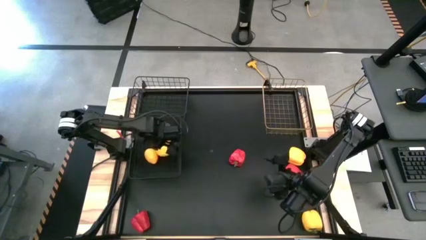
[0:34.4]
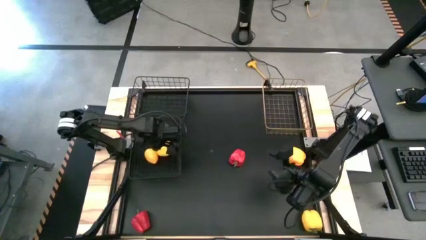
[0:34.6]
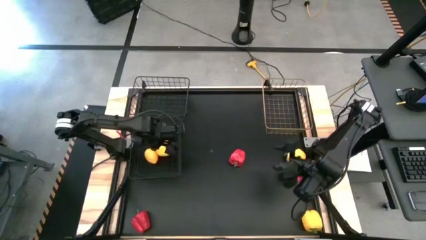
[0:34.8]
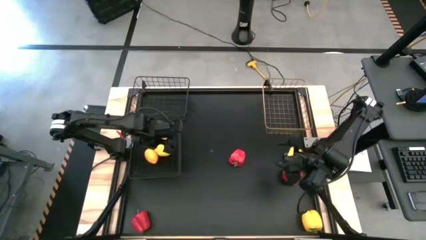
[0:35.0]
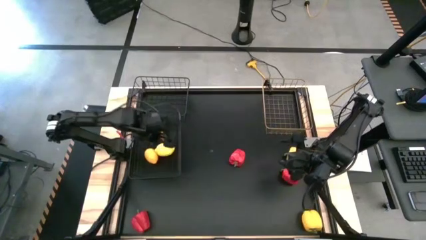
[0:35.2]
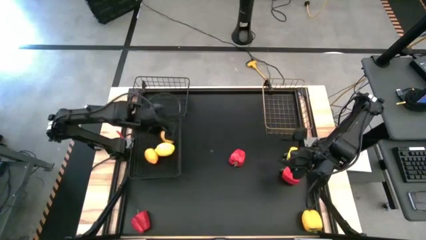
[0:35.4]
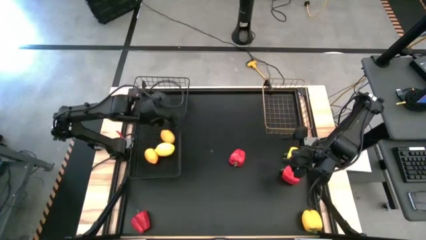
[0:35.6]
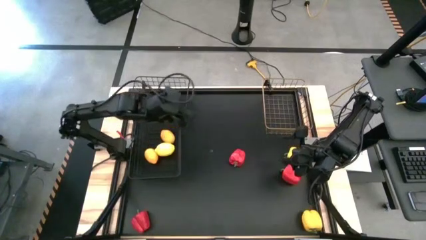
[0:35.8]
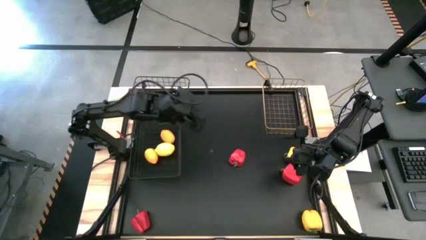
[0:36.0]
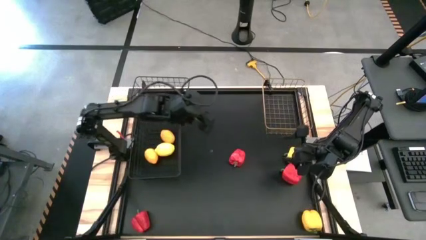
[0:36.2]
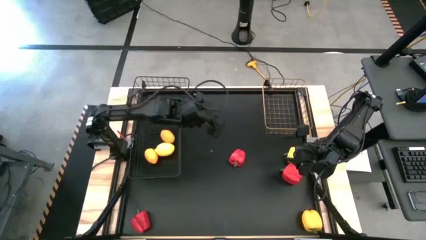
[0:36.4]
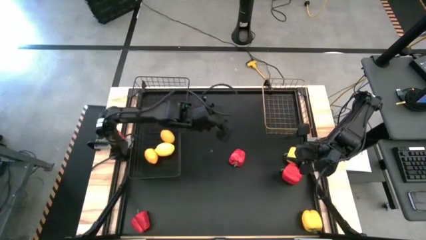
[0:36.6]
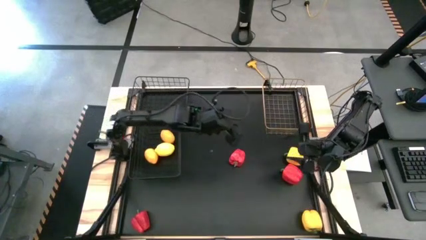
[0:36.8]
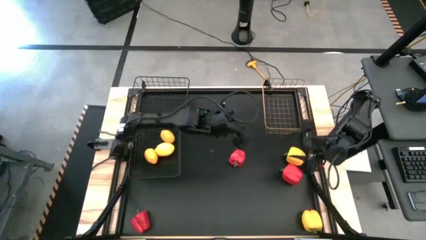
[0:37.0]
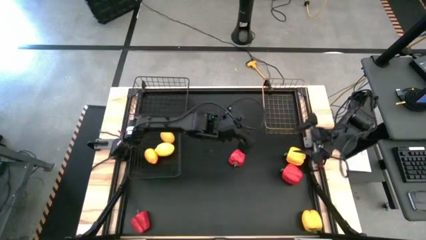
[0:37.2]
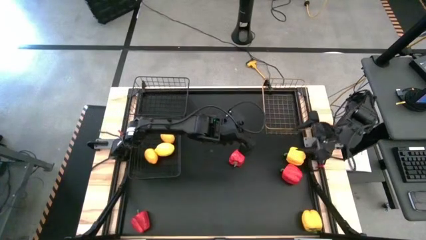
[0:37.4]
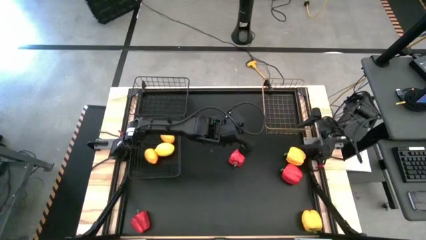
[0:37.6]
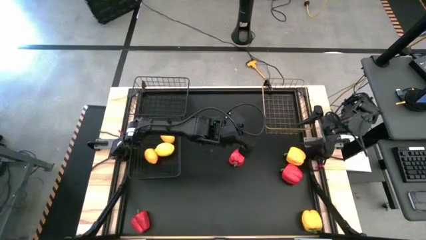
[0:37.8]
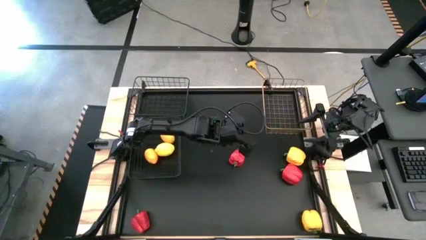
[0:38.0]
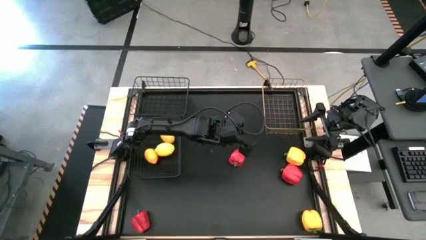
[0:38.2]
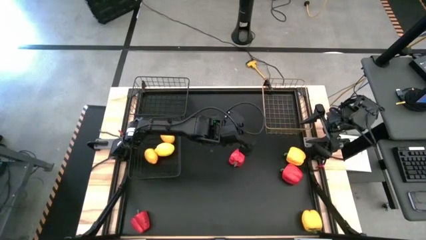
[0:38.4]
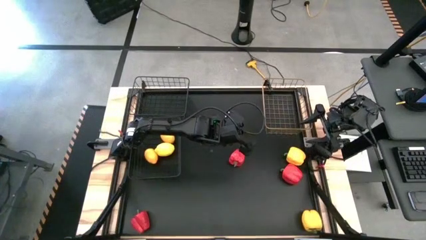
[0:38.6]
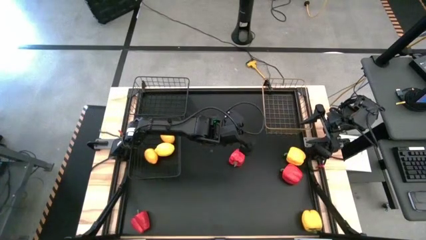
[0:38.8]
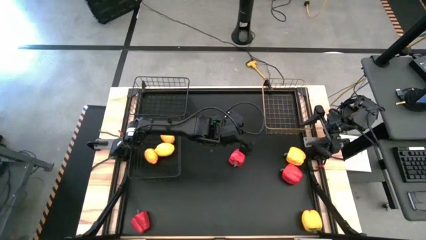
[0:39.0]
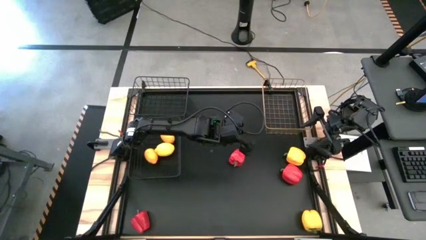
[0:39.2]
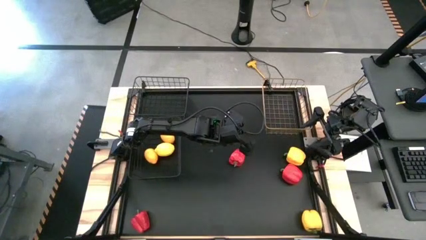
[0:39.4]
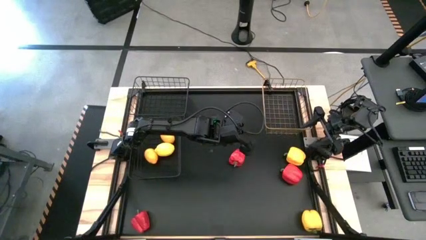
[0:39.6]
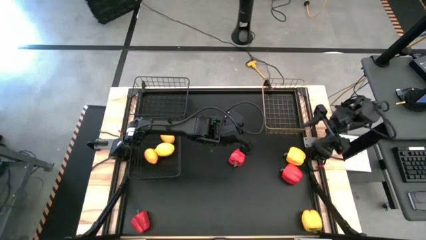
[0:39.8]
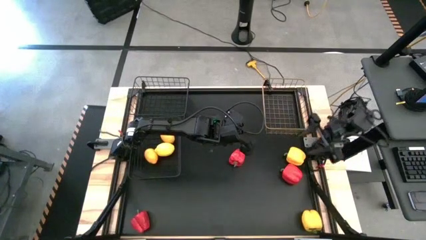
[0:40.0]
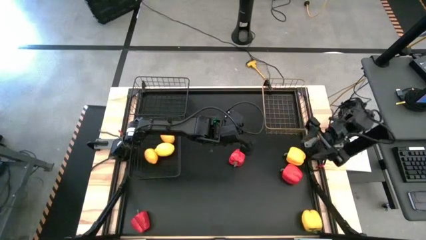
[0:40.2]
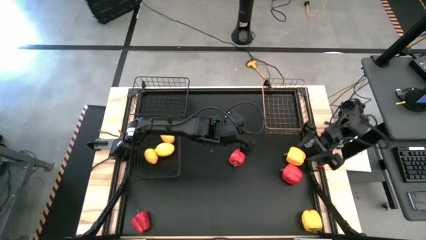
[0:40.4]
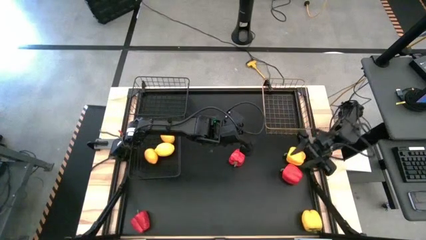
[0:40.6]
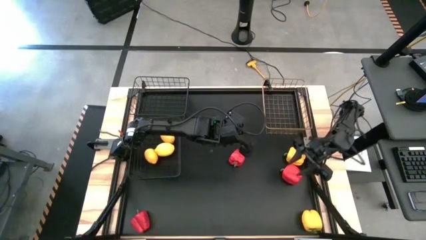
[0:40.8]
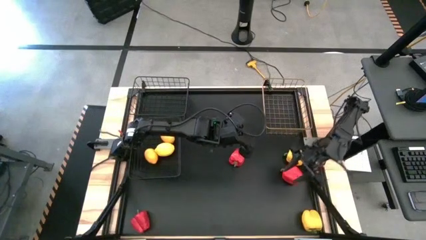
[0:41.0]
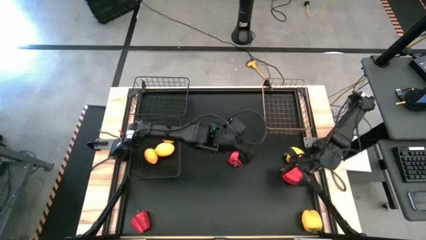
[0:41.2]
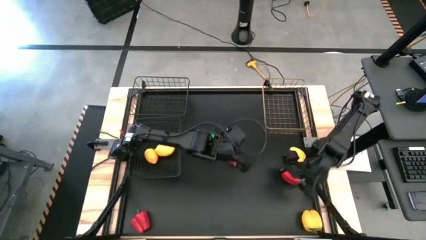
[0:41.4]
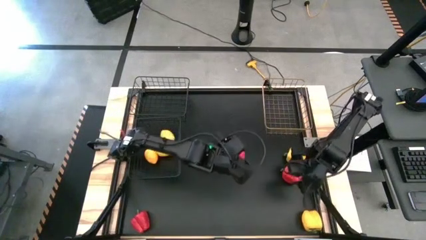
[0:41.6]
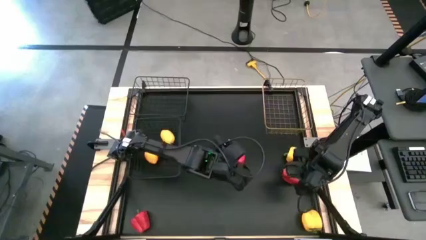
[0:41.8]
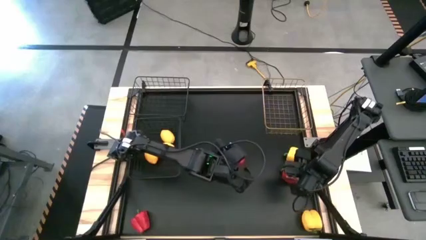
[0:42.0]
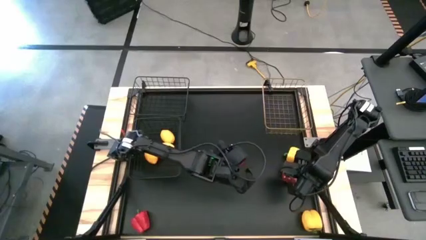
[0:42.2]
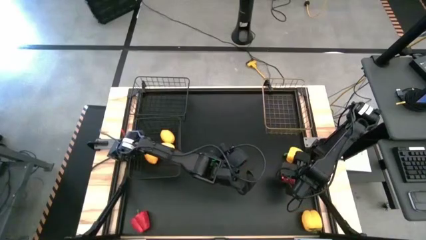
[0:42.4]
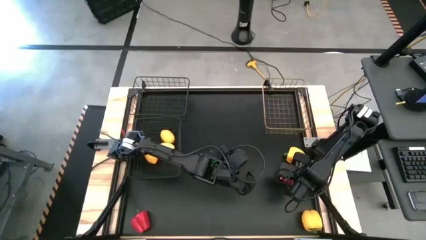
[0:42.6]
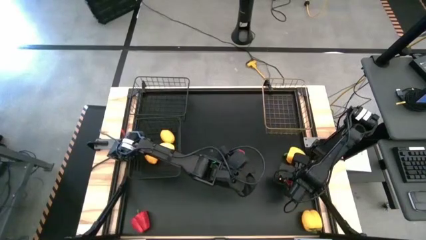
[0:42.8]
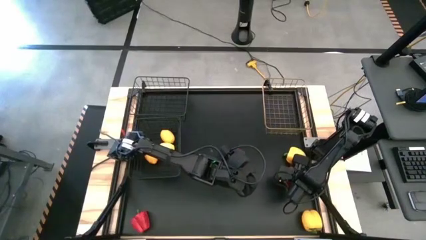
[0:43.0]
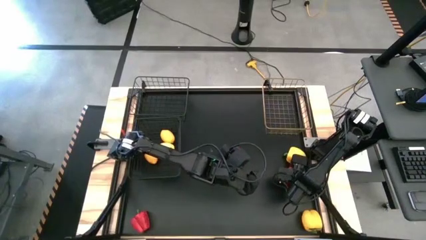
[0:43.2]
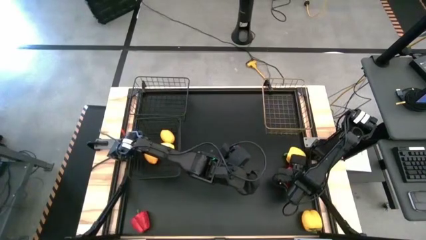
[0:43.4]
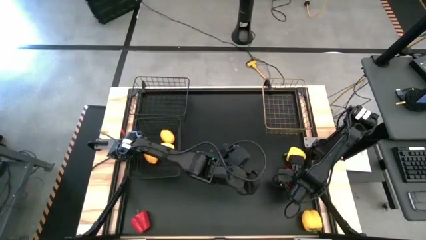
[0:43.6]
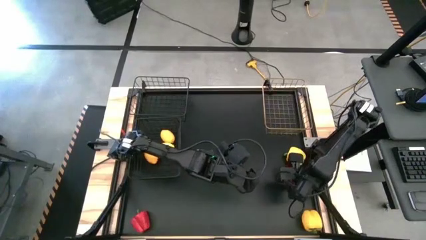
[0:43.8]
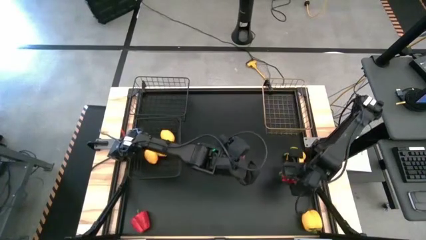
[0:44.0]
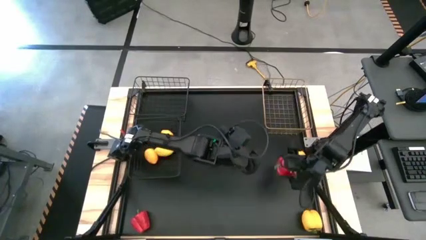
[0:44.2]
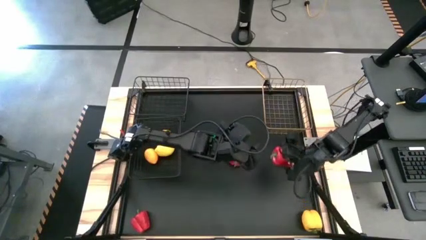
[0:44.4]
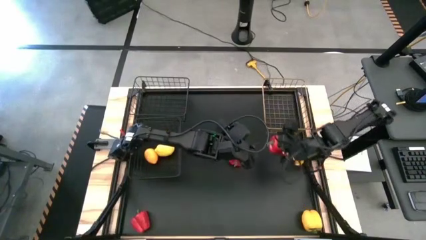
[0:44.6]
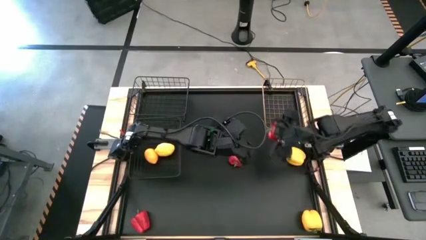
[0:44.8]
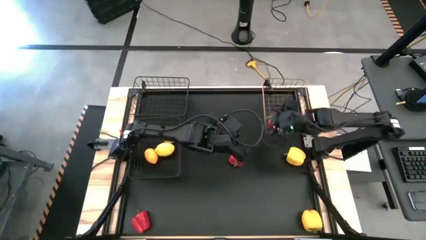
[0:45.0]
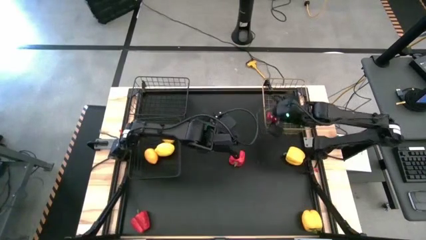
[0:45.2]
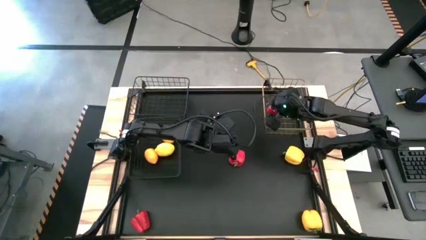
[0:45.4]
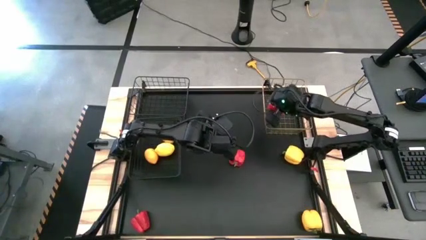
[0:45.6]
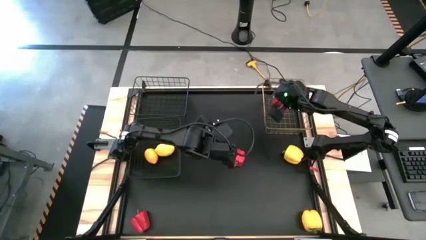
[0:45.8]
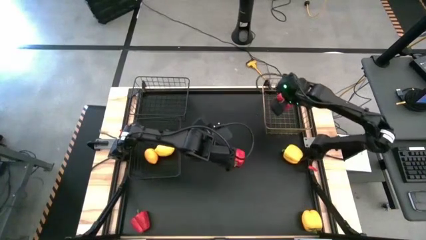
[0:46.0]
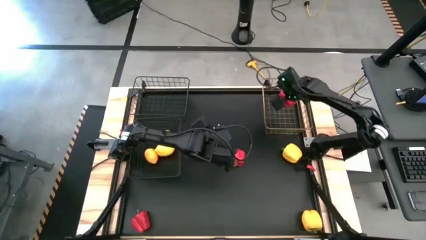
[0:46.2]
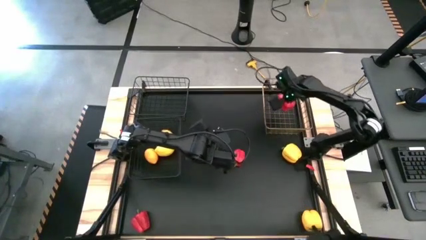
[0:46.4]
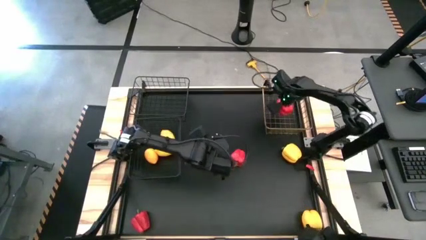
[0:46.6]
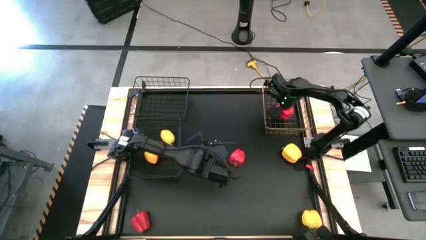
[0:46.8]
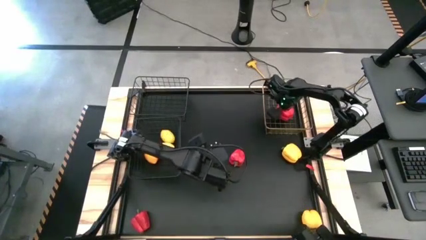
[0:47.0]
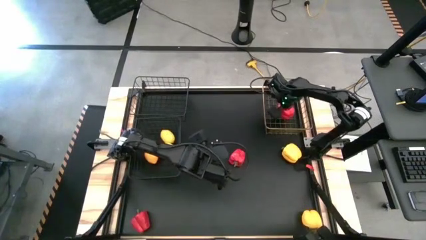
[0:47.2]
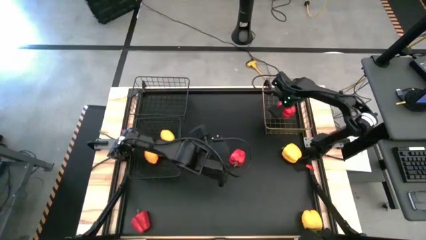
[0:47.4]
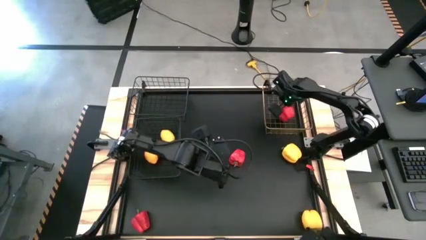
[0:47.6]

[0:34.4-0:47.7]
Task: Sort produce into baskets
Put the top right red bell pepper into the gold wire basket

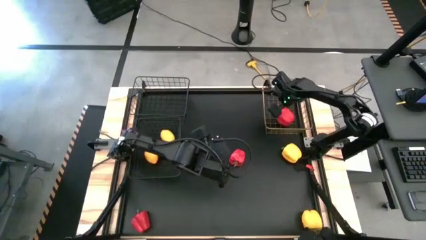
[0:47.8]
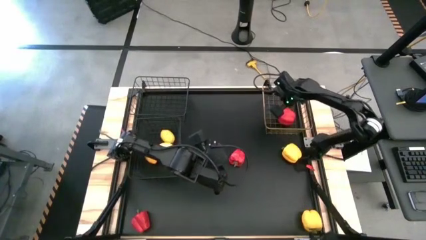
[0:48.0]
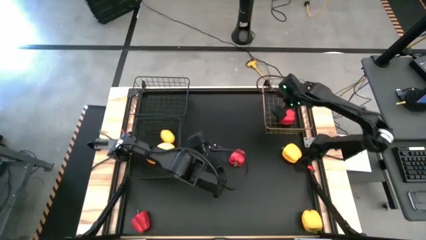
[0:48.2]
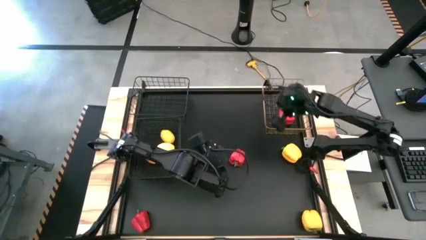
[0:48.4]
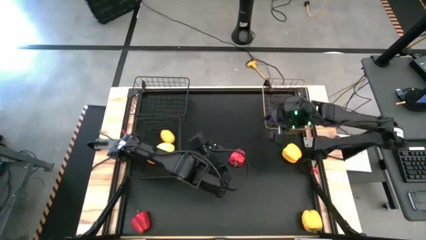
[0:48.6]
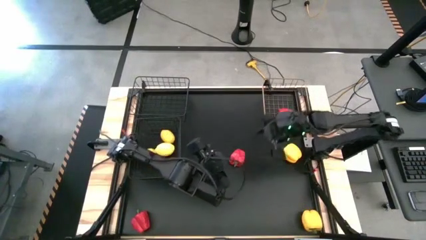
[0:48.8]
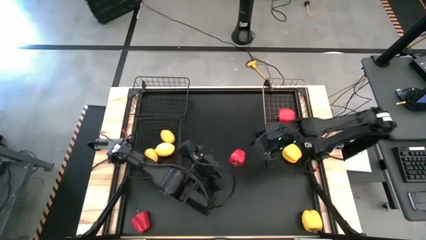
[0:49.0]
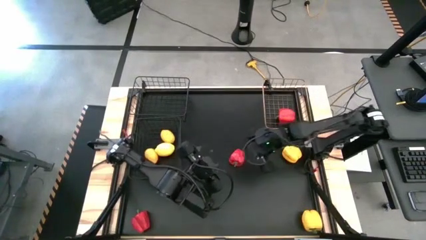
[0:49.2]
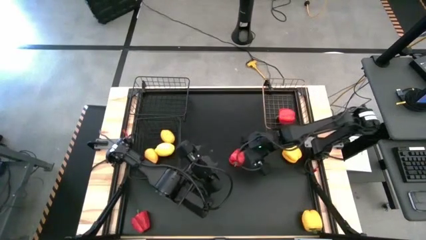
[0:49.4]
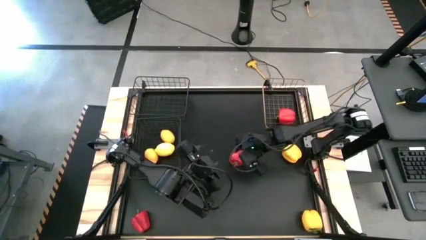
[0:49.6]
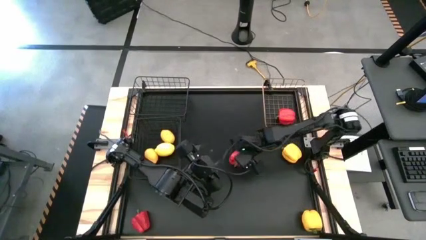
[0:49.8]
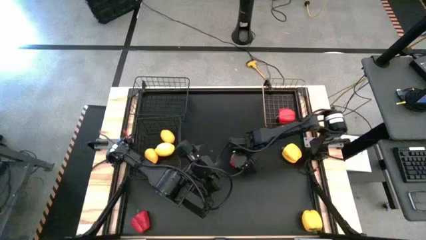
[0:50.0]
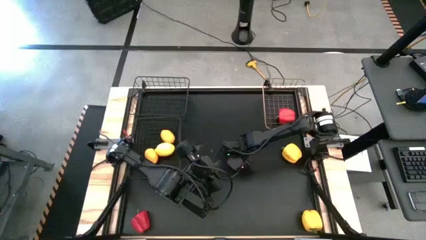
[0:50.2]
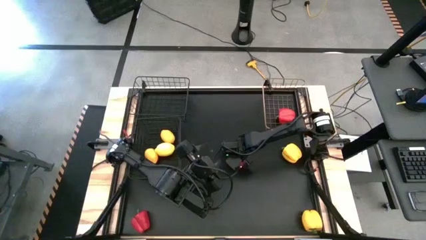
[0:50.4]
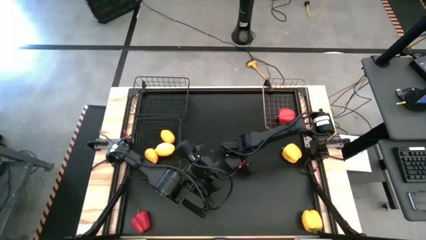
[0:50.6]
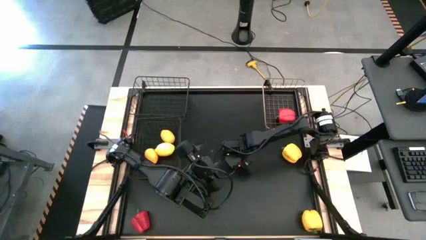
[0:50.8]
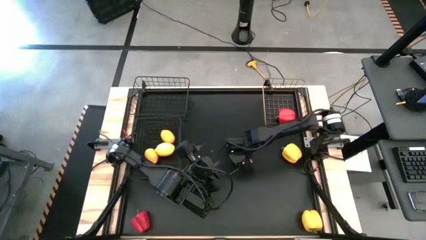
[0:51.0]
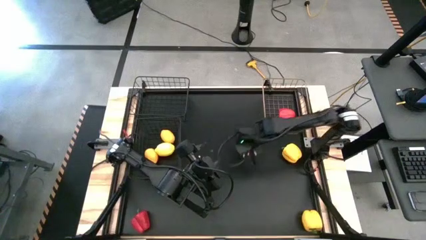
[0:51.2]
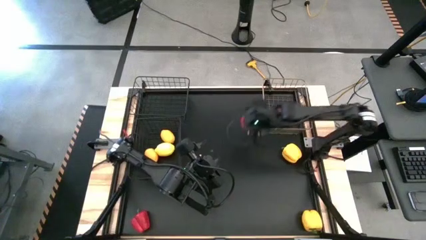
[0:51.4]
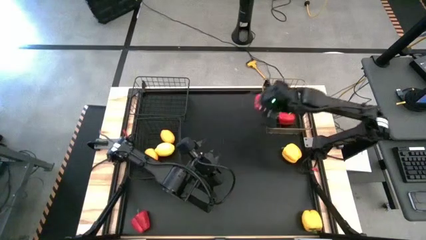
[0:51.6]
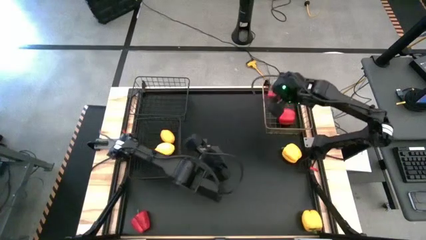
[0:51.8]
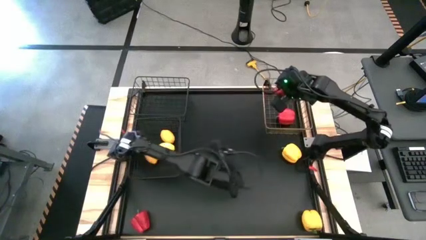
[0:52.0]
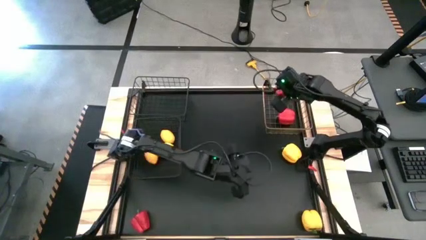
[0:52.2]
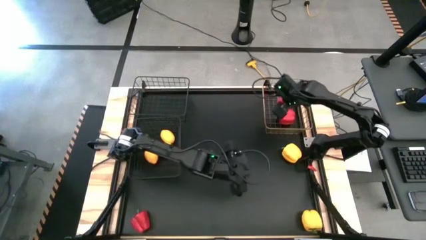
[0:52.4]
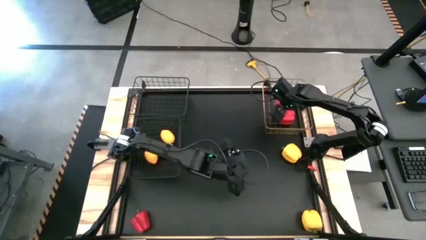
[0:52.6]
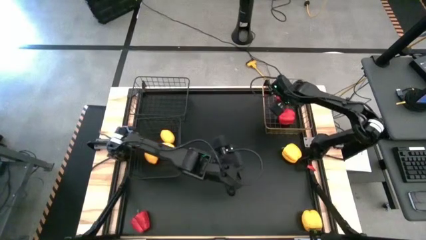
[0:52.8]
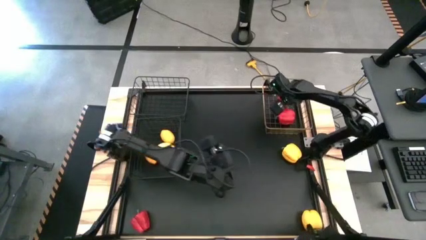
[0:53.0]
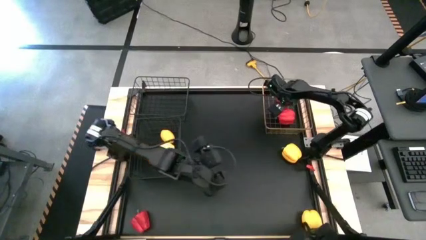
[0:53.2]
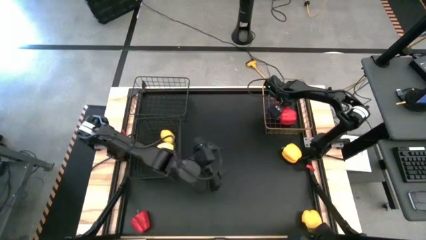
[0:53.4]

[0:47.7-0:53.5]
Put the top red bell pepper into the gold wire basket
